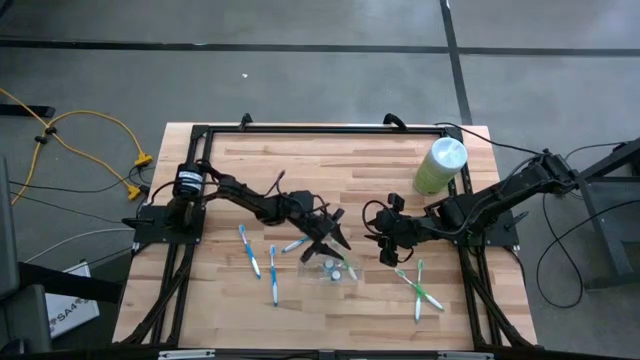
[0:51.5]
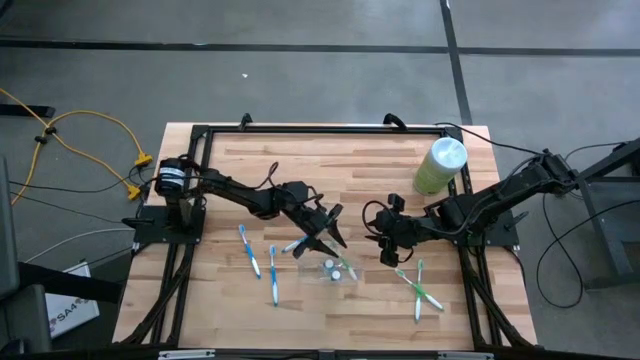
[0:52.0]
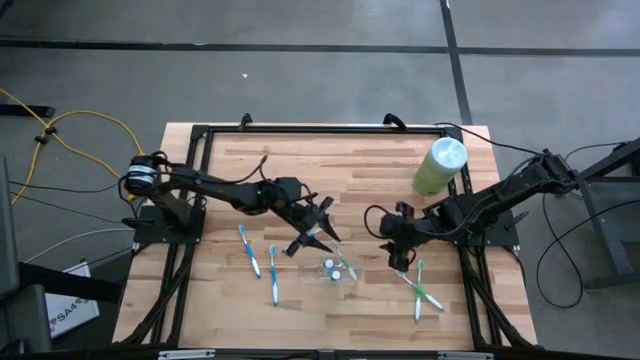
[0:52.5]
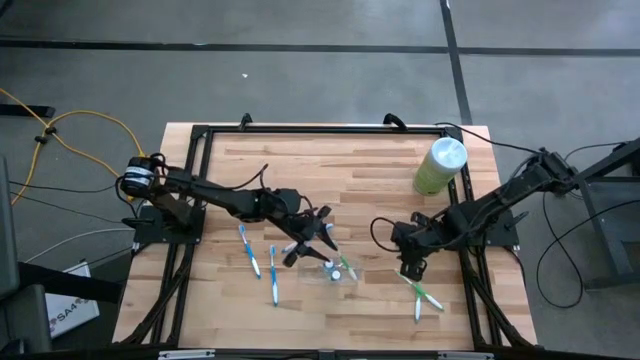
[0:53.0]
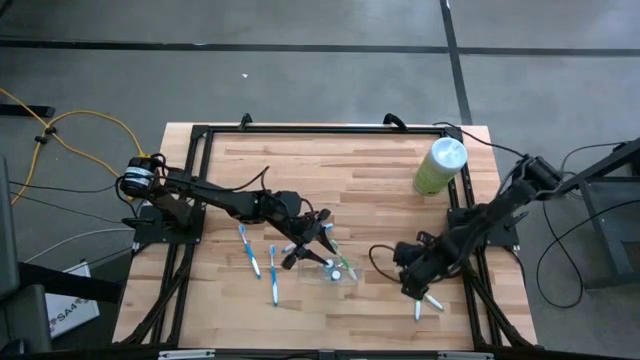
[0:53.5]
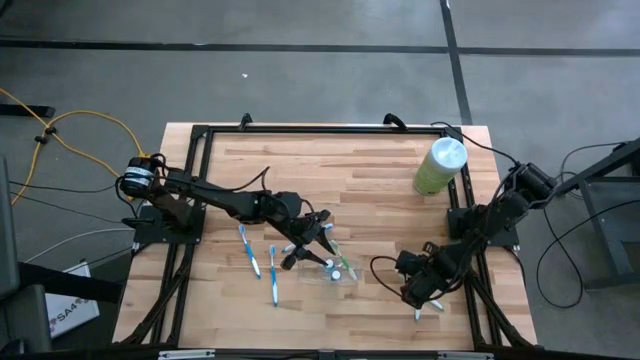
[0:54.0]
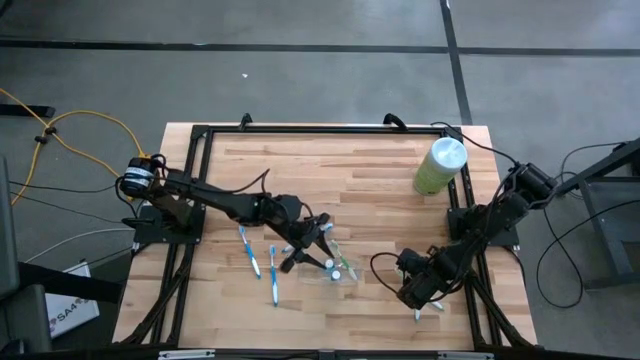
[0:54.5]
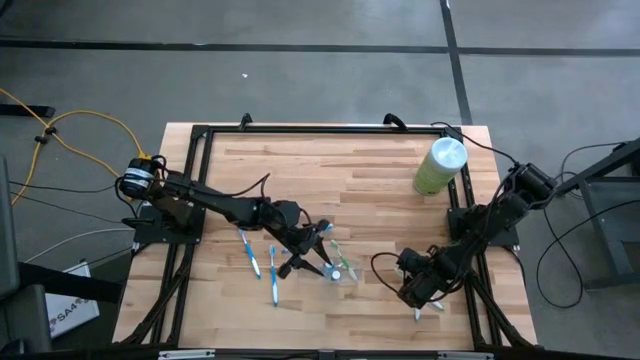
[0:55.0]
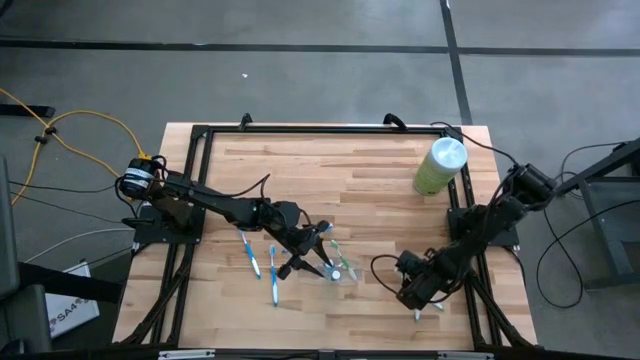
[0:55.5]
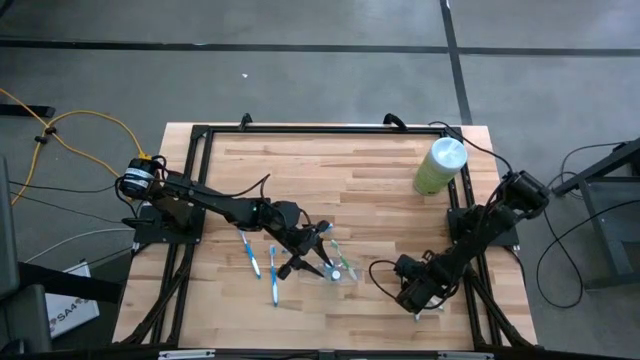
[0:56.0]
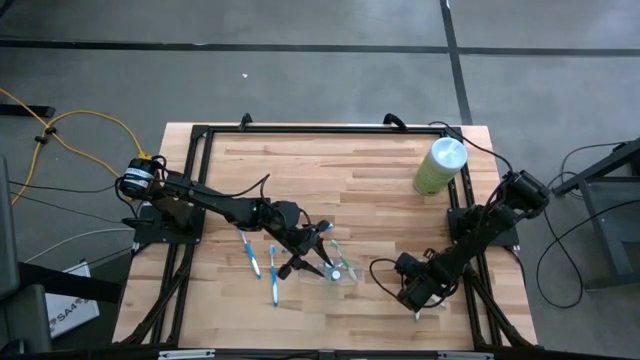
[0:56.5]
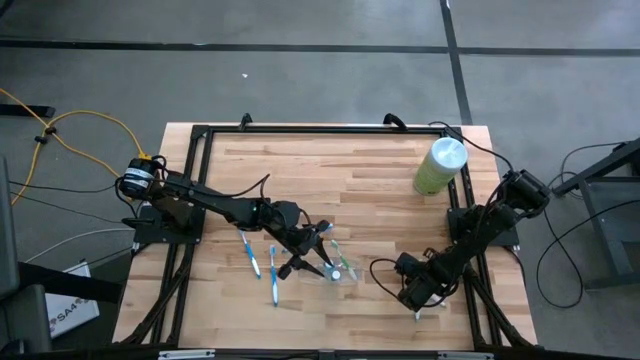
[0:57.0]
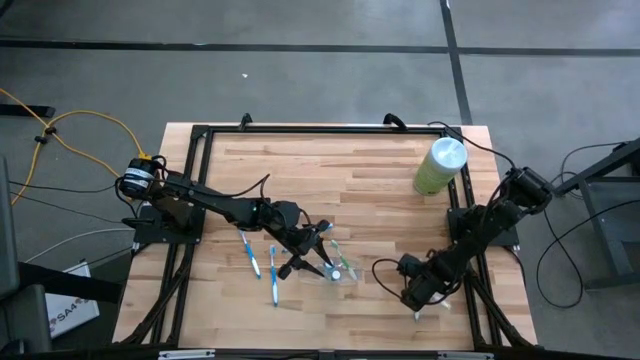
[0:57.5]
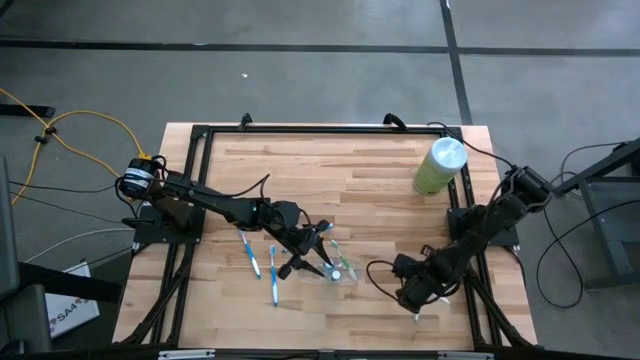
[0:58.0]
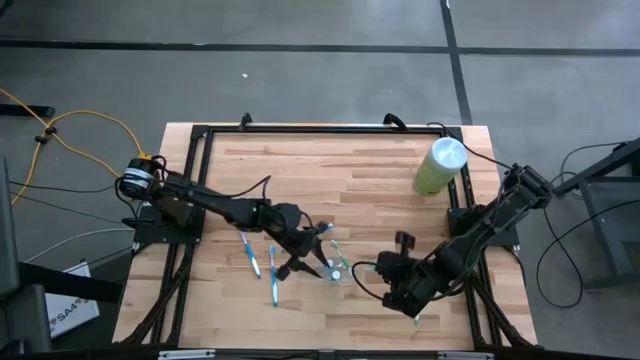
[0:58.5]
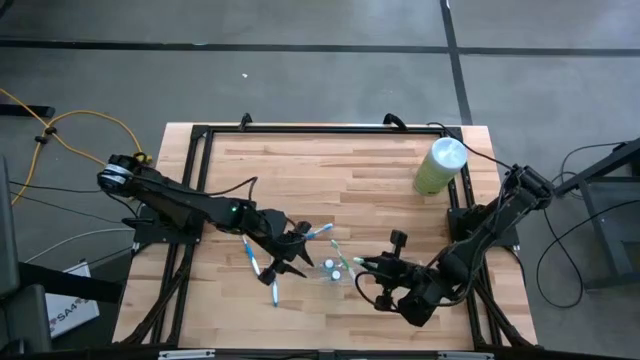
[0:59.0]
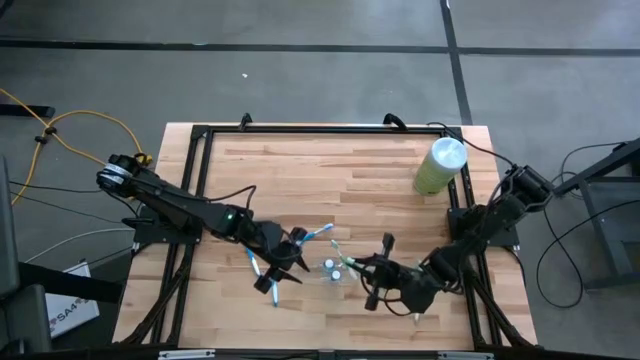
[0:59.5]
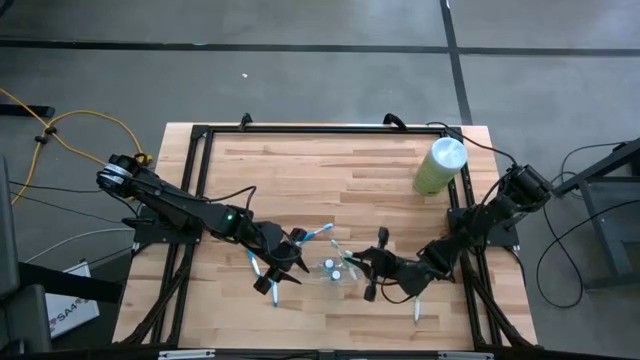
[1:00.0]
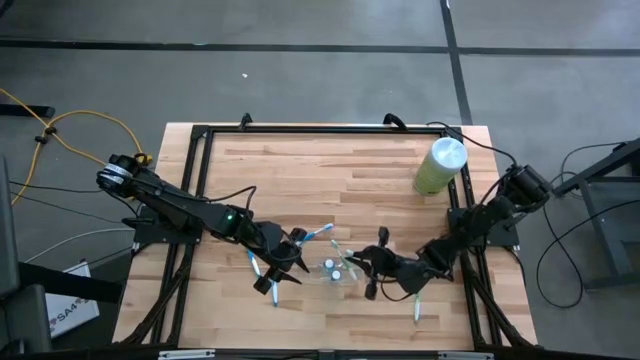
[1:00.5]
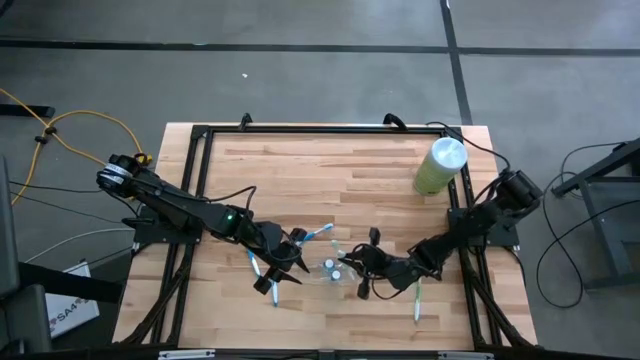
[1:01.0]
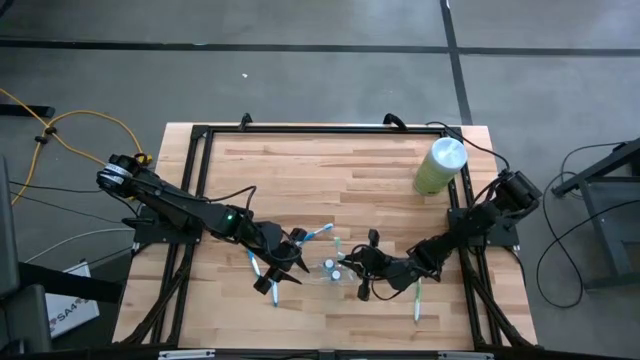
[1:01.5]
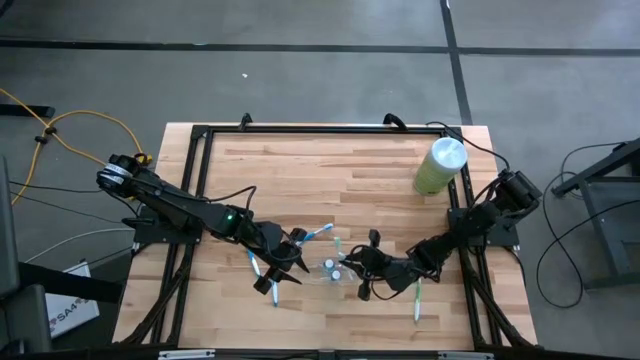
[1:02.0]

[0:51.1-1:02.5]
Task: Pick & Place toothbrushing station
Put the left green toothbrush into the transparent organizer

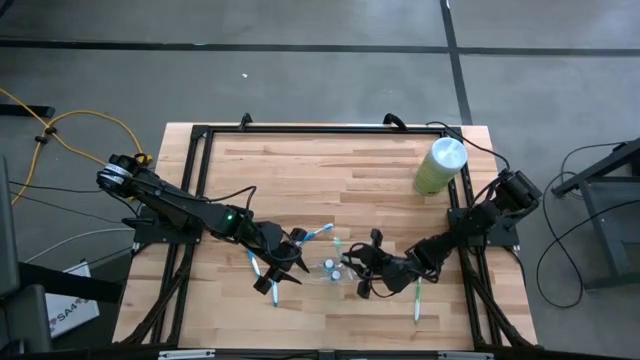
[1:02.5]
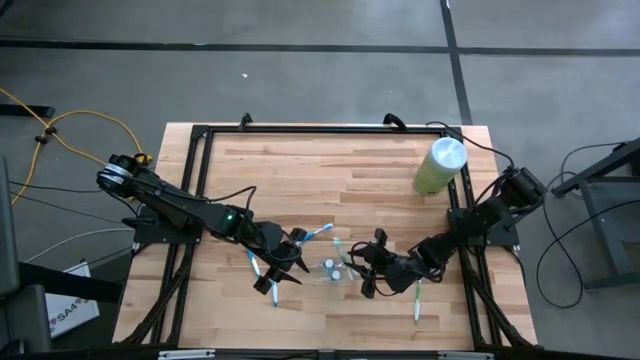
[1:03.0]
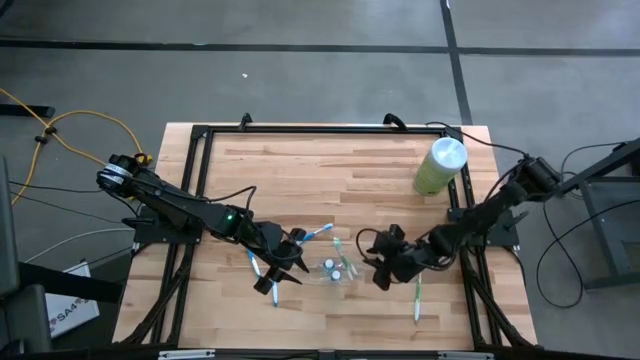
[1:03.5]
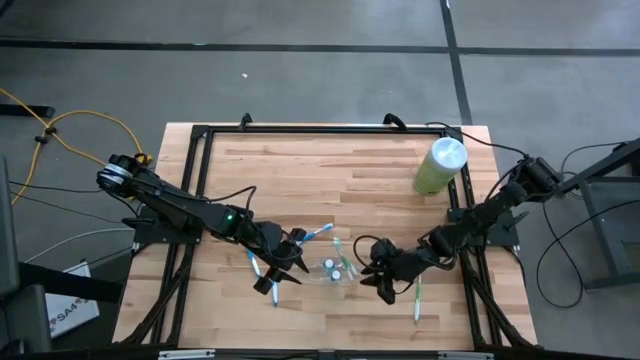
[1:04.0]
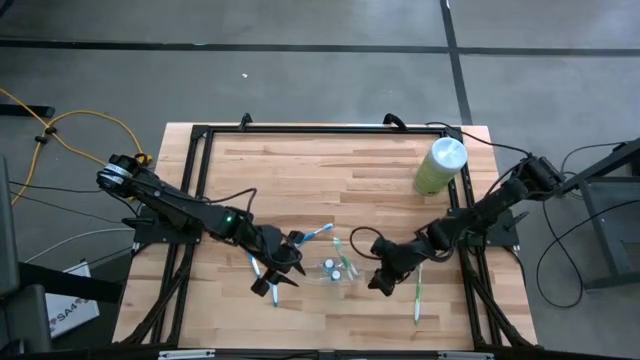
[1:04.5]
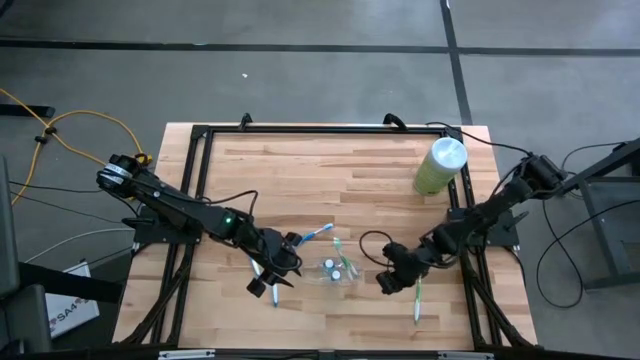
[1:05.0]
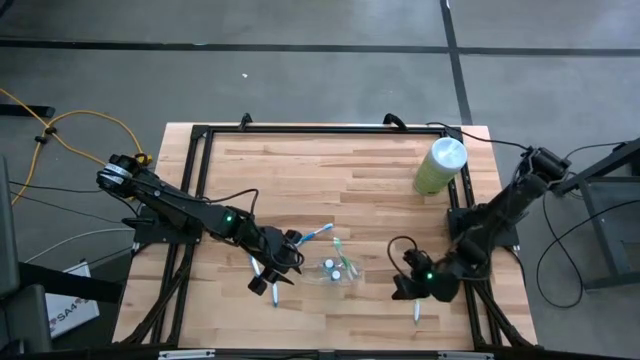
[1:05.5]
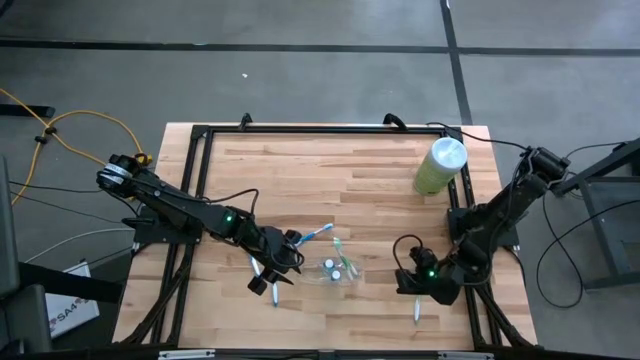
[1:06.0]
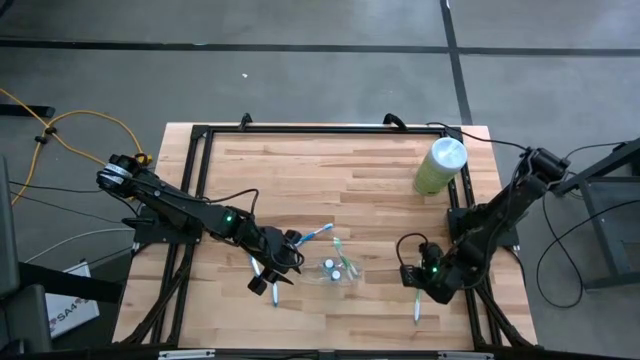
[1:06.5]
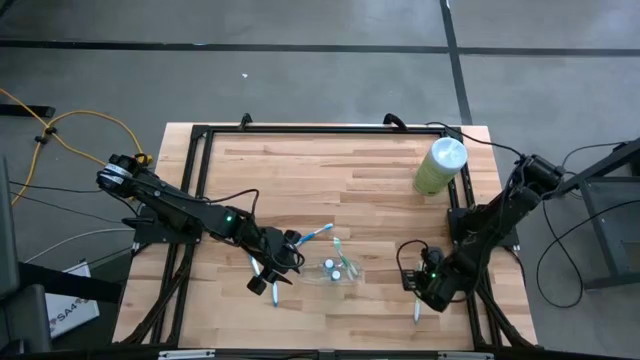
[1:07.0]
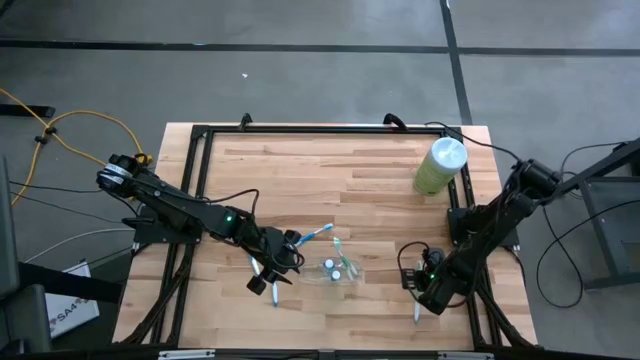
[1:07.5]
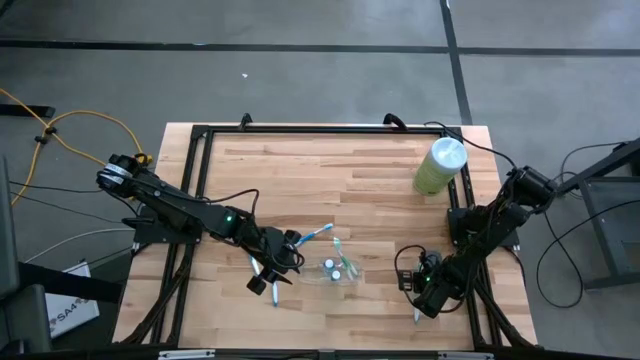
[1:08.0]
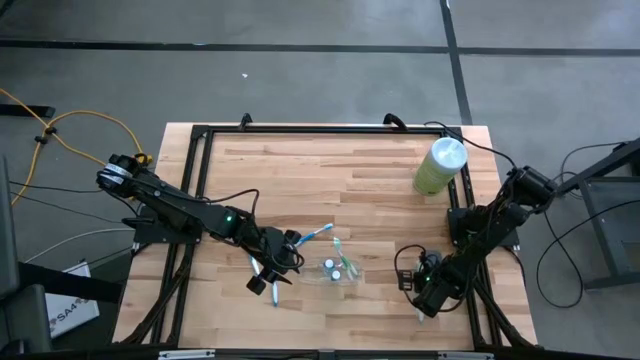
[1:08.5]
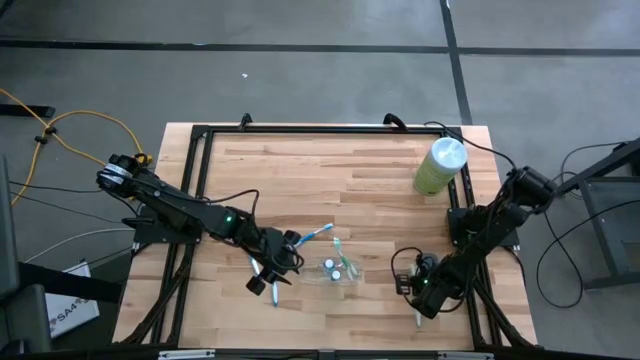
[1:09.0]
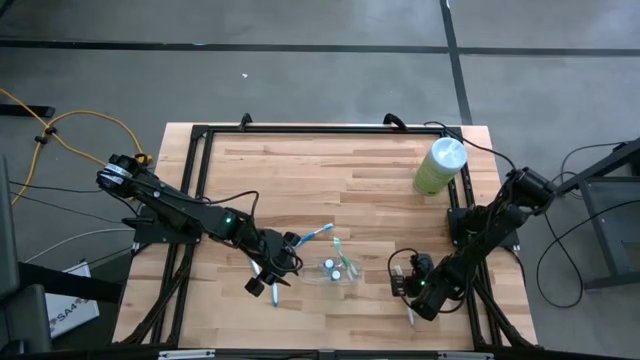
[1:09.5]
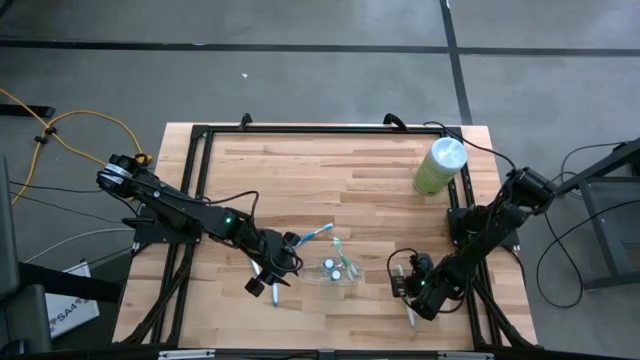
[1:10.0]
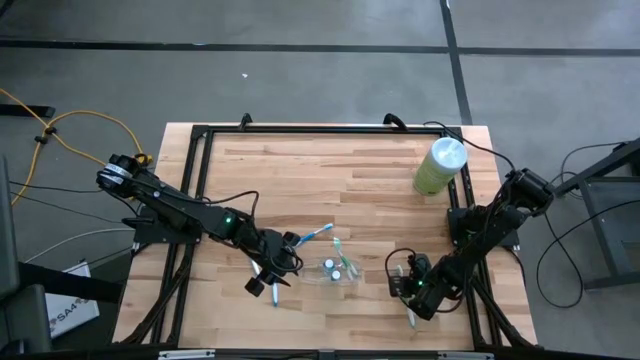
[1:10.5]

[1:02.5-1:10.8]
Put the green toothbrush into the transparent organizer
